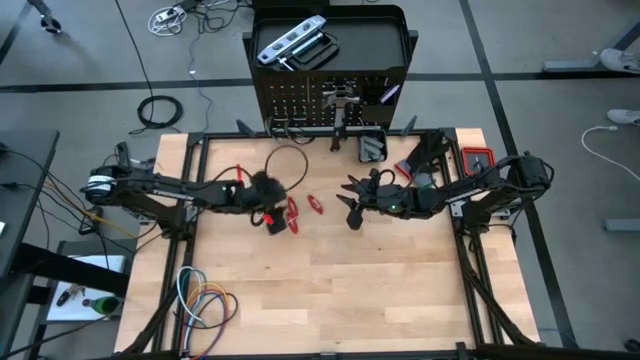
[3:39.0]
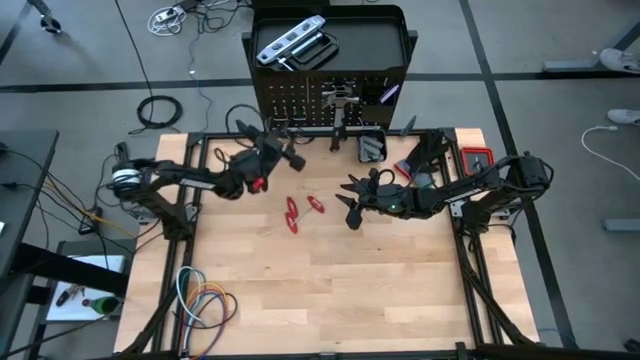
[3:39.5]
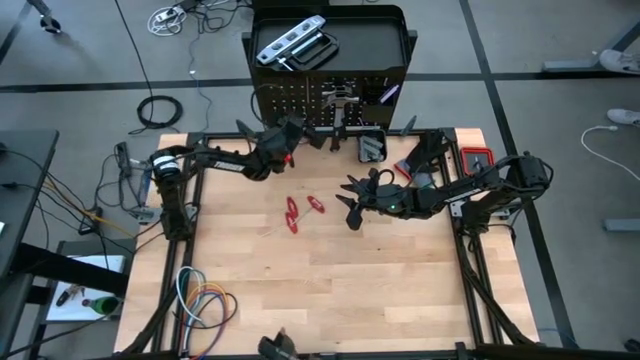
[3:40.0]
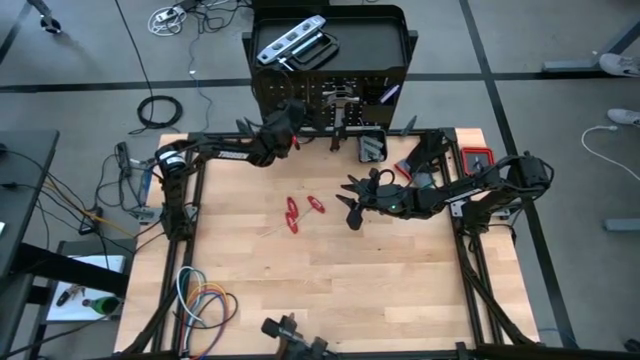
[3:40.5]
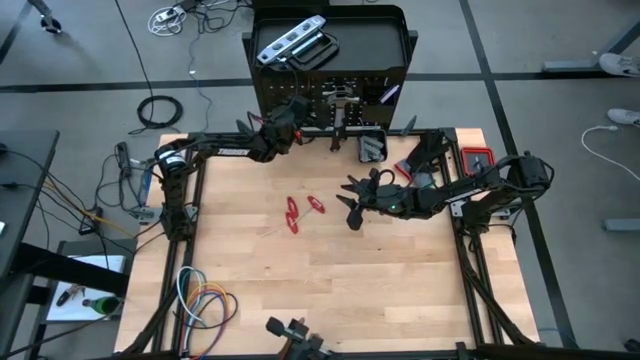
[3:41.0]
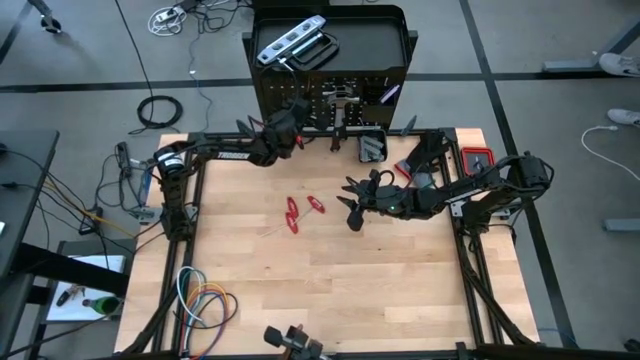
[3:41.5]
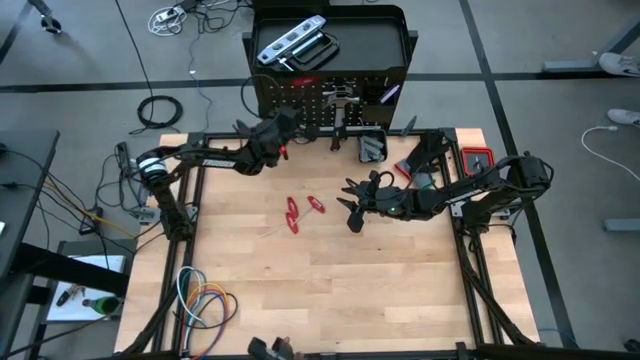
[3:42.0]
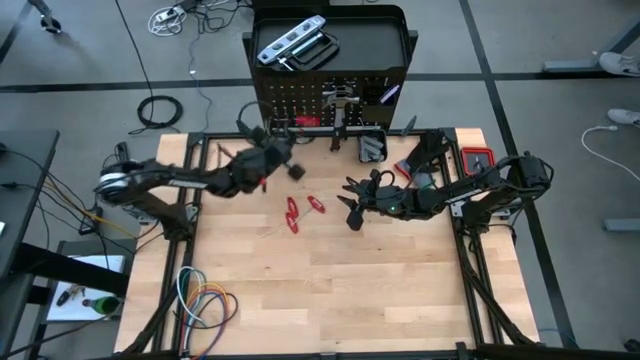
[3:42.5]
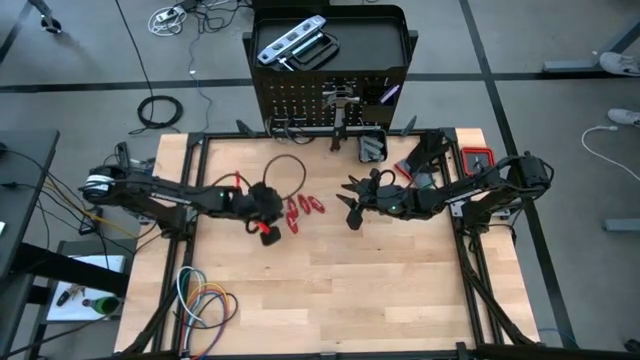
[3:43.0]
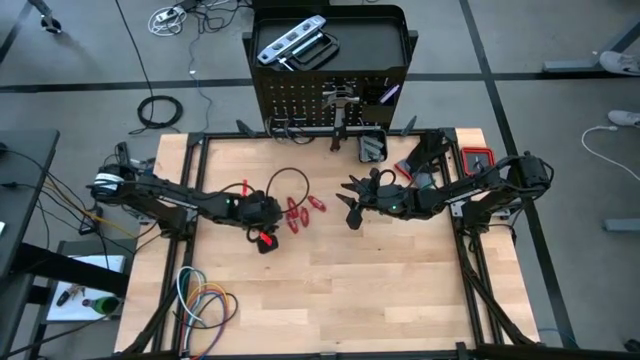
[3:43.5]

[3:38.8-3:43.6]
Task: Hang tools onto peg board
Remove the allen wrench from the peg board

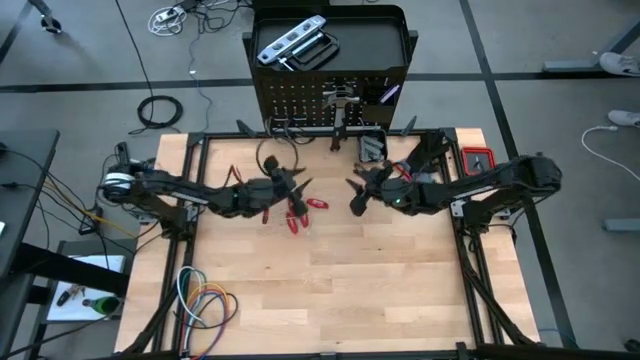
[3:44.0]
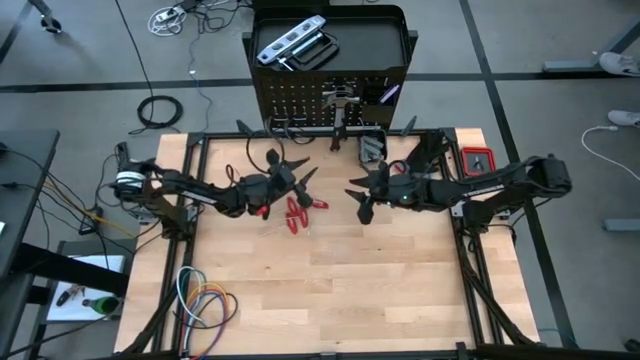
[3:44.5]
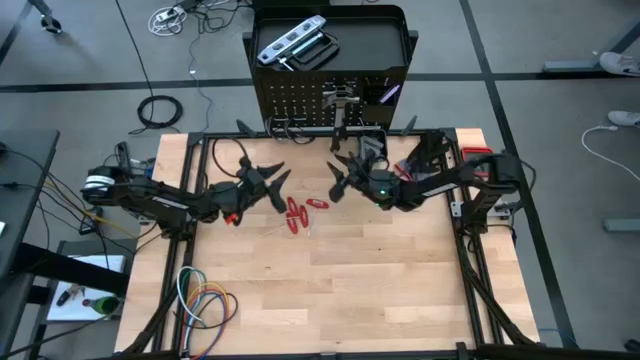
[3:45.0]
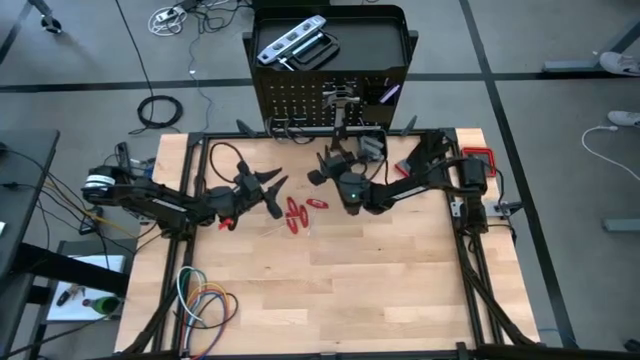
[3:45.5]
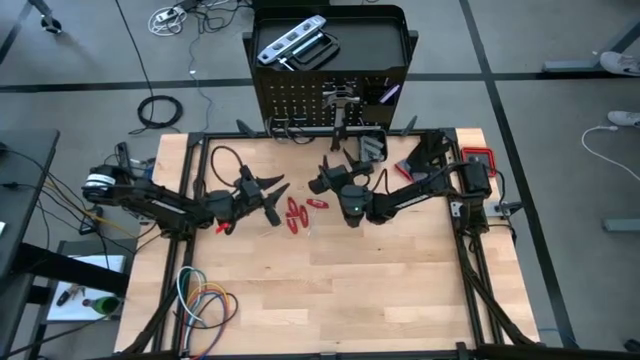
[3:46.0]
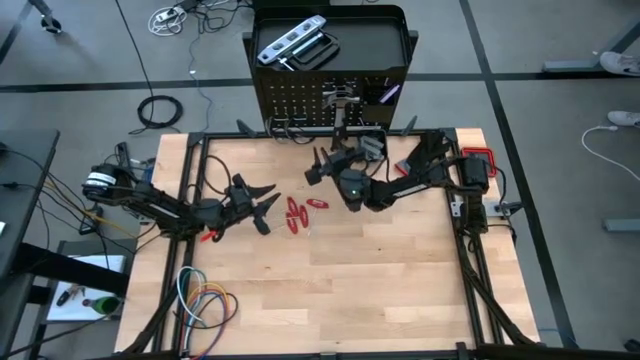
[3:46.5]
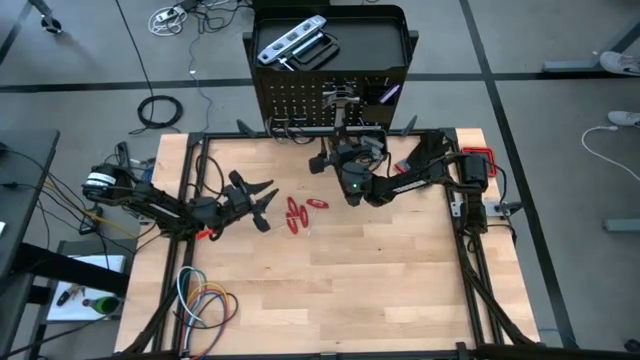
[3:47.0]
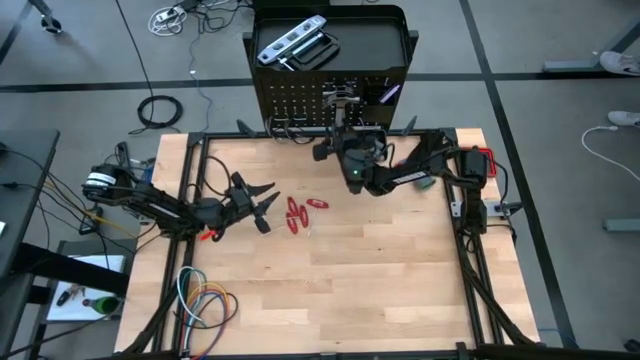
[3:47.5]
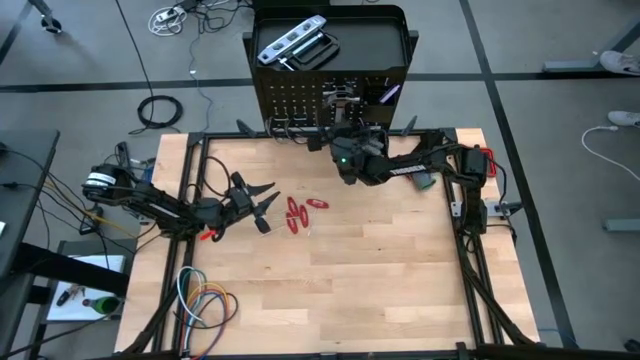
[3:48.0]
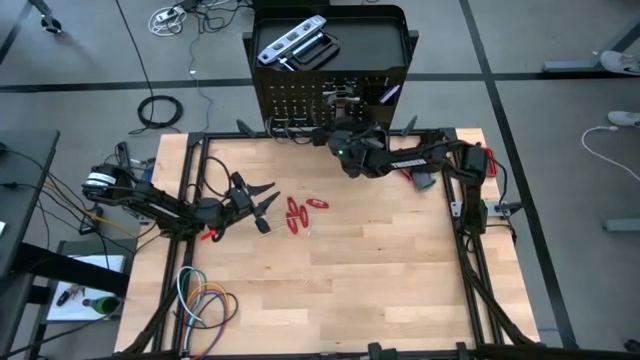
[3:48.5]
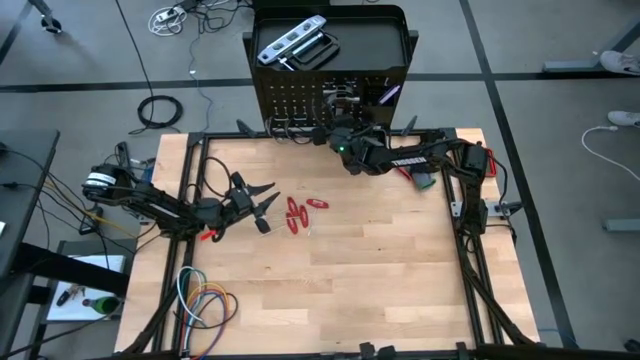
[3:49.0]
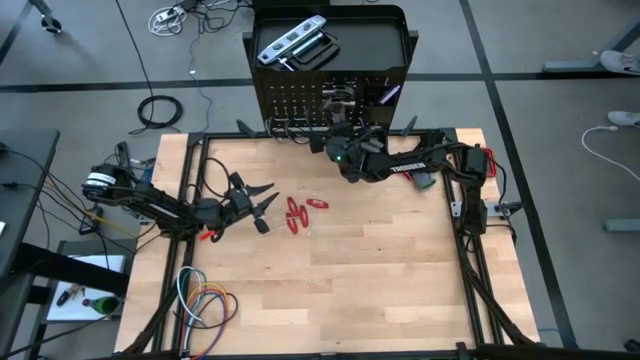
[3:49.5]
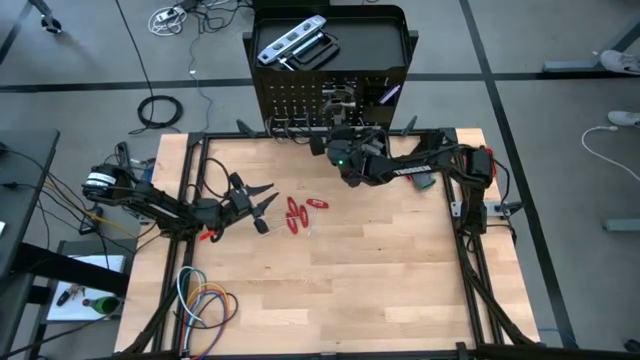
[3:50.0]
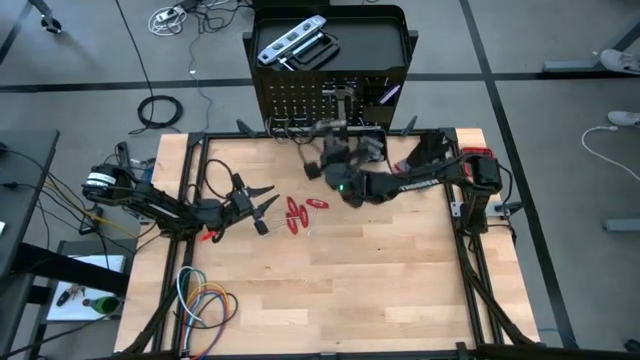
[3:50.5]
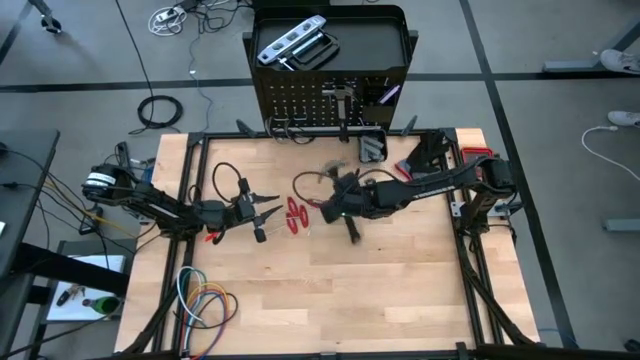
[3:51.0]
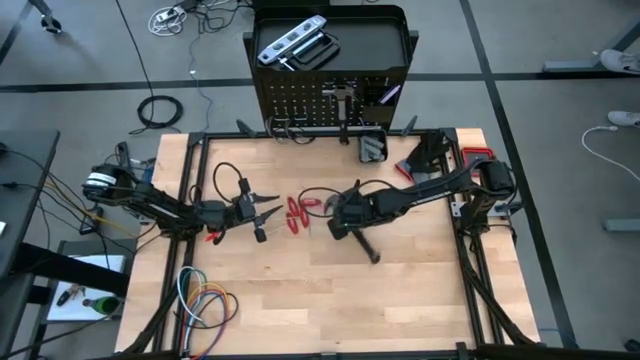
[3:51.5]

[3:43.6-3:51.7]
Remove the front hammer from the peg board

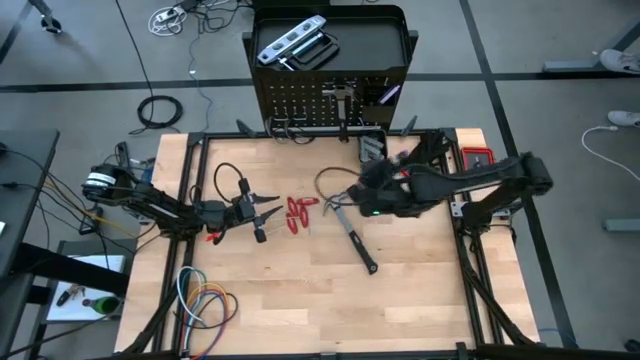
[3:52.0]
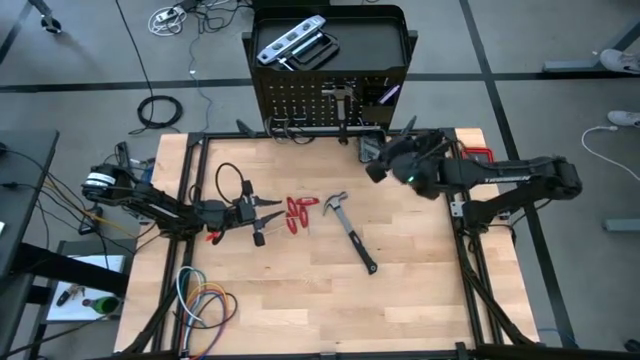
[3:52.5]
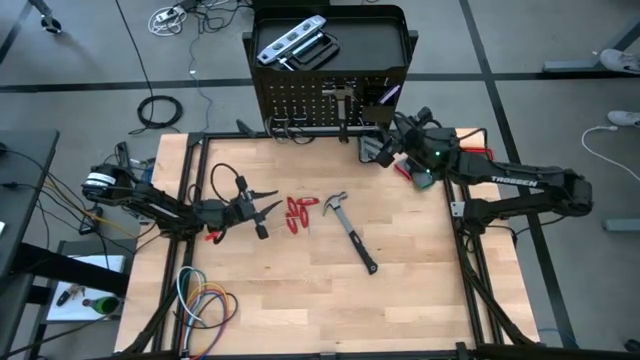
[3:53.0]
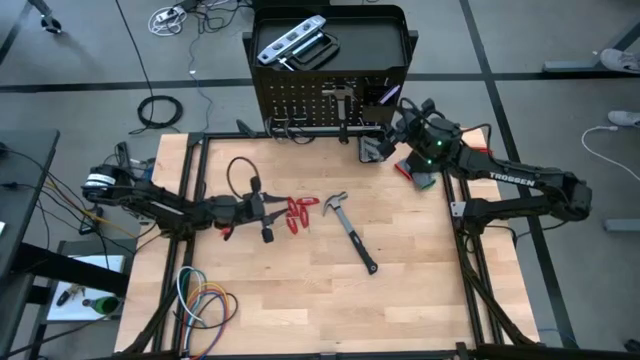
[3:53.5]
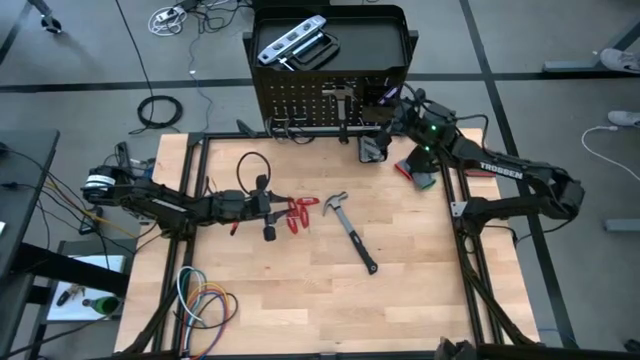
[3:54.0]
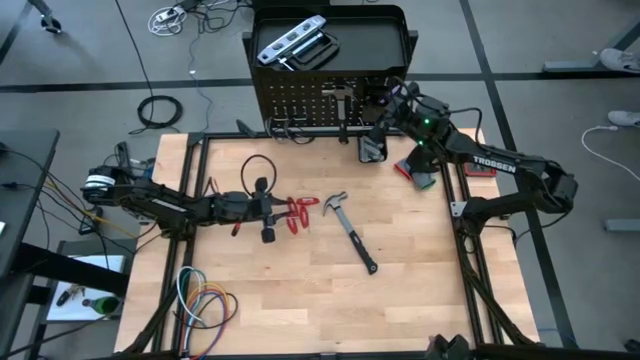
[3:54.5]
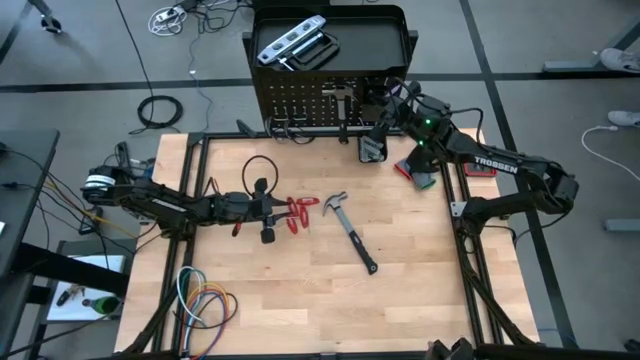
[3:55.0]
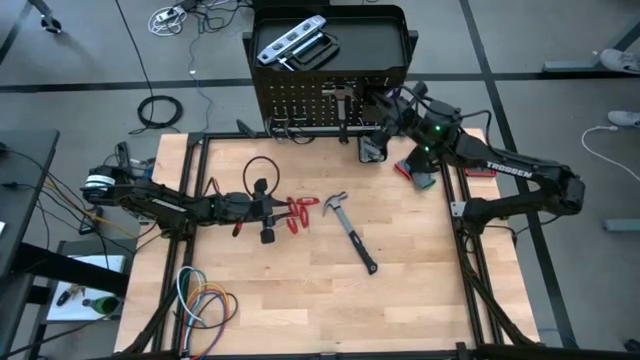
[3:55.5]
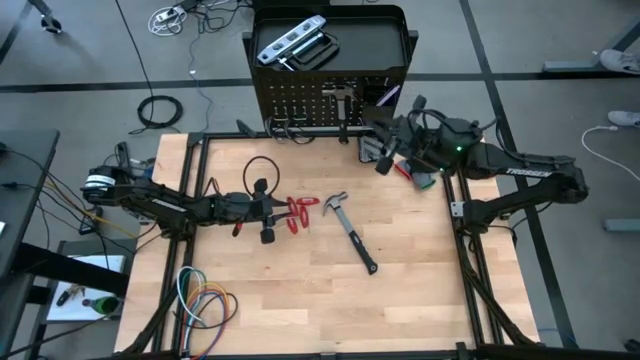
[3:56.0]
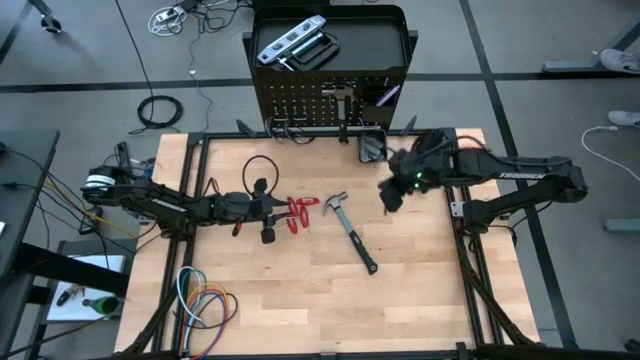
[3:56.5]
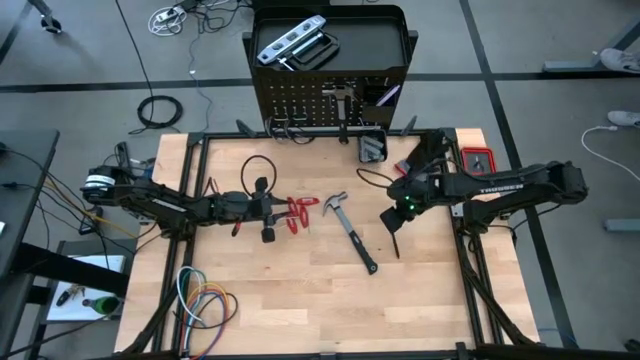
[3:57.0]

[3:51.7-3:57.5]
Remove the middle black pen from the top basket from the peg board

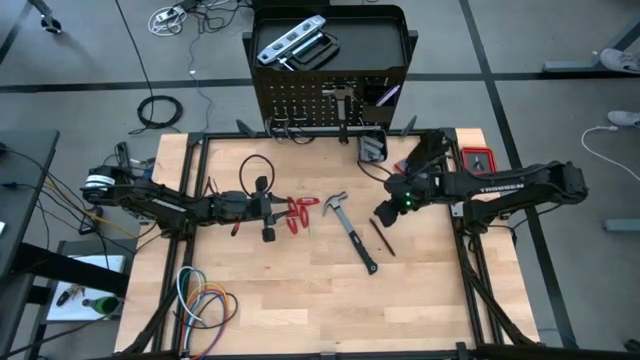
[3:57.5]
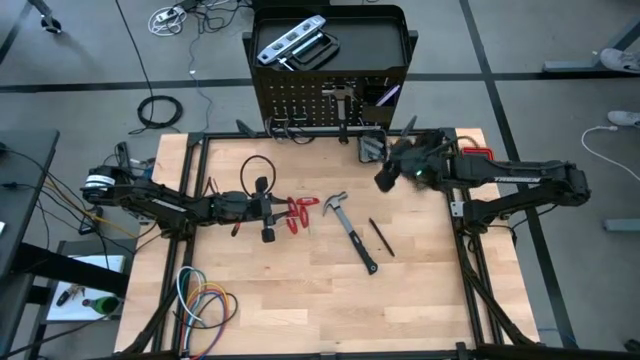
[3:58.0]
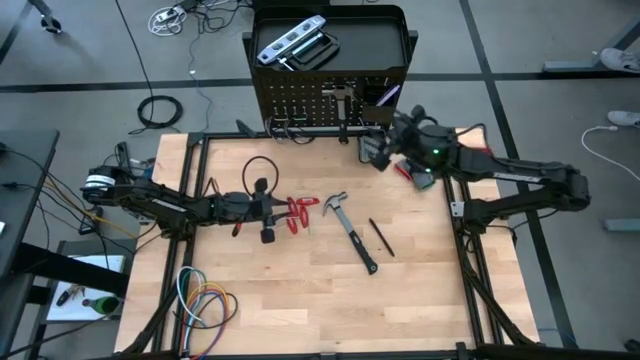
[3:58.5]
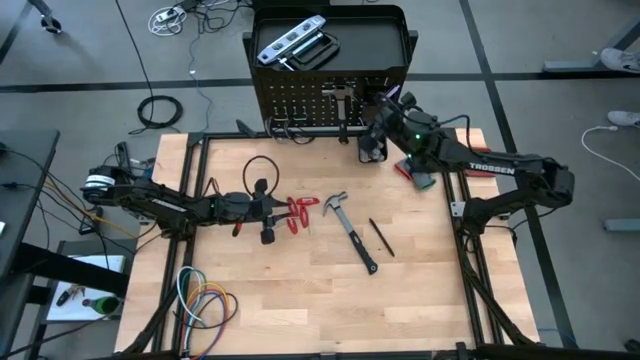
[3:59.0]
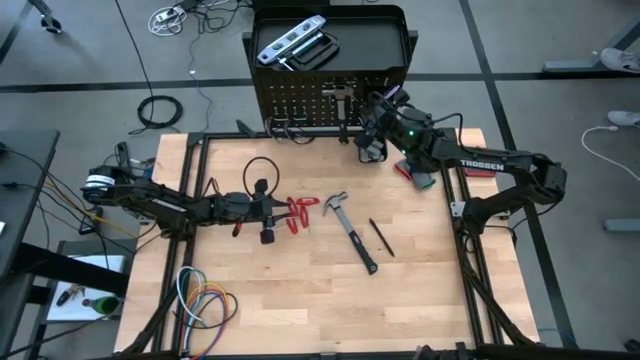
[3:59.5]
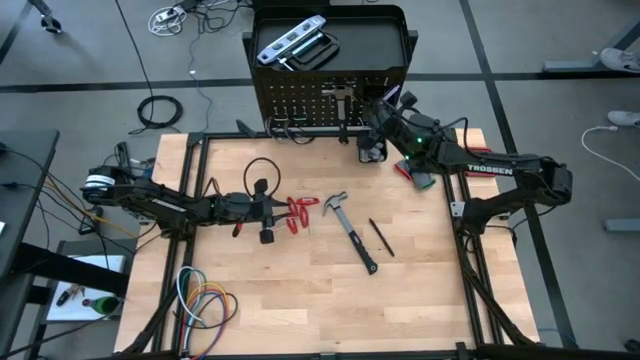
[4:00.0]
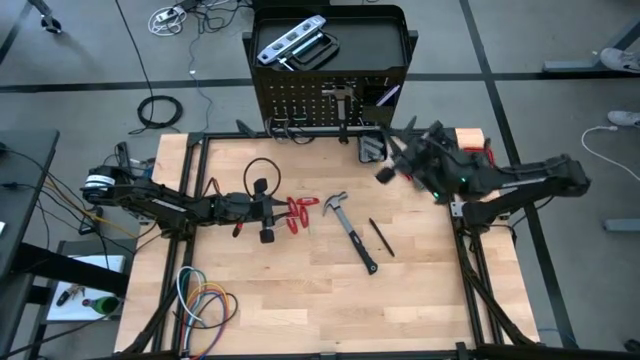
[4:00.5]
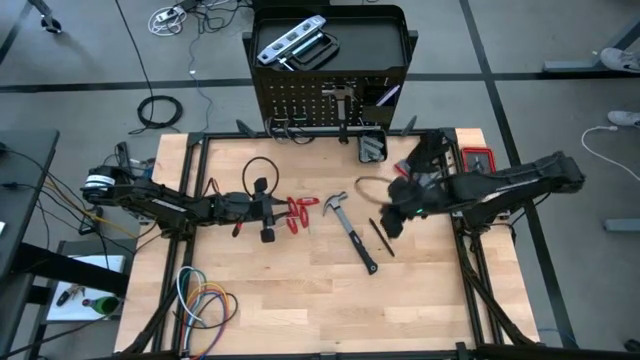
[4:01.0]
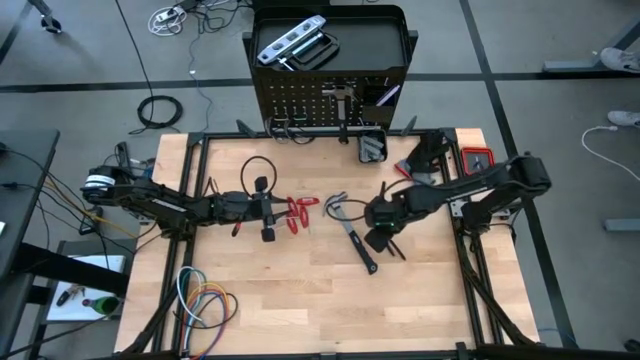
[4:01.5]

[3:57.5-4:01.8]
Remove the left black pen from the top basket from the peg board
